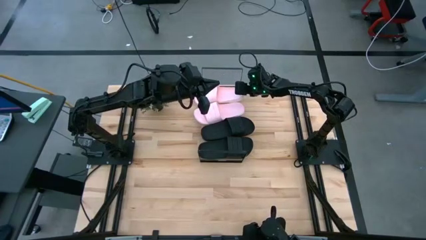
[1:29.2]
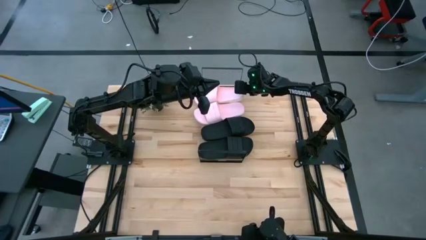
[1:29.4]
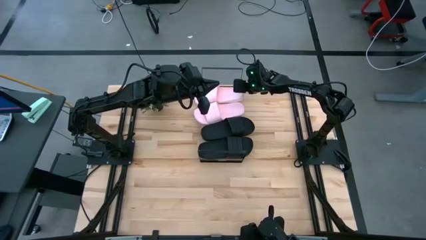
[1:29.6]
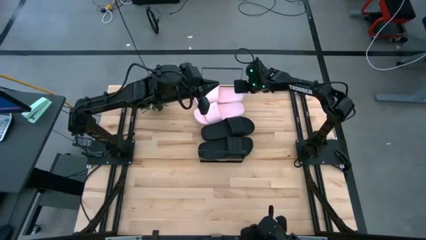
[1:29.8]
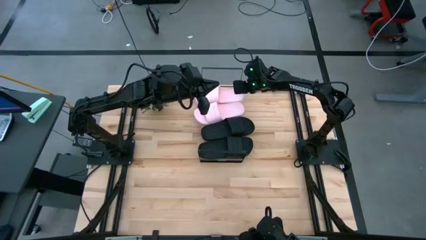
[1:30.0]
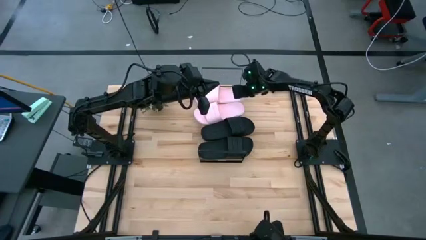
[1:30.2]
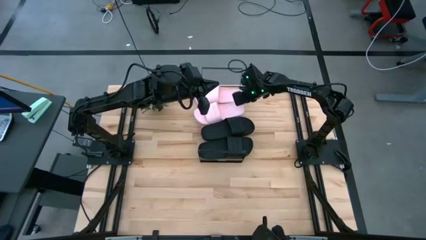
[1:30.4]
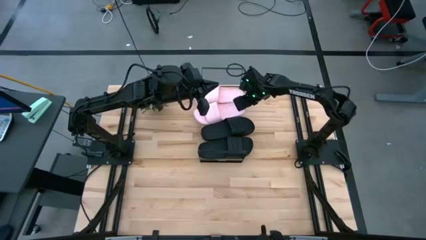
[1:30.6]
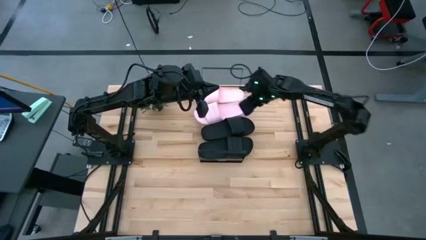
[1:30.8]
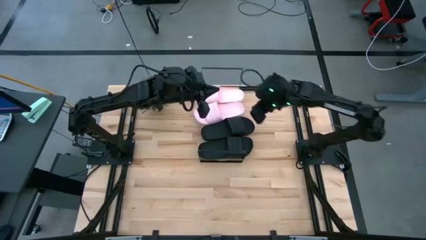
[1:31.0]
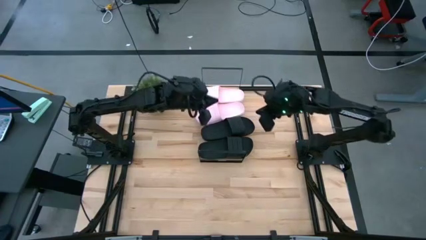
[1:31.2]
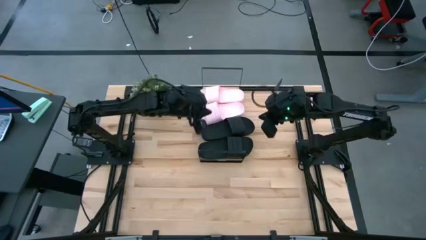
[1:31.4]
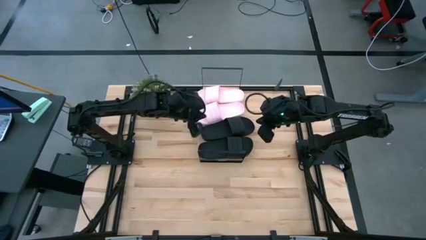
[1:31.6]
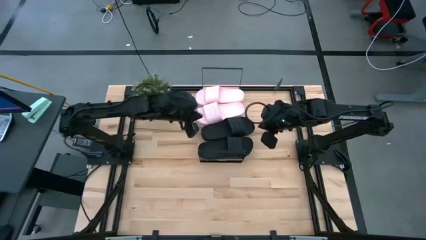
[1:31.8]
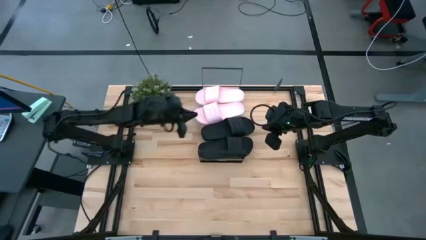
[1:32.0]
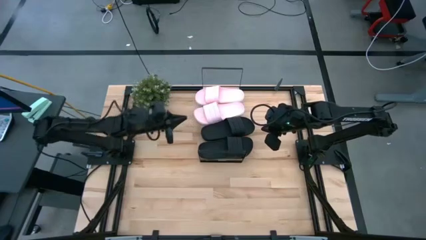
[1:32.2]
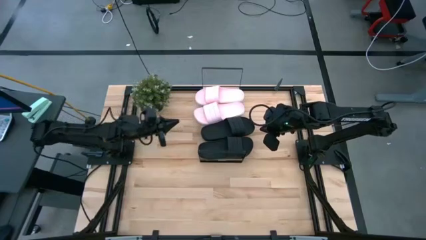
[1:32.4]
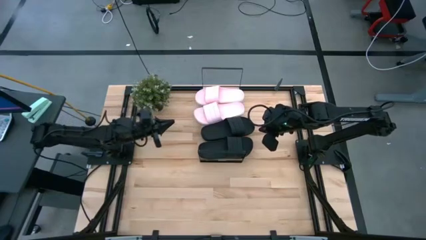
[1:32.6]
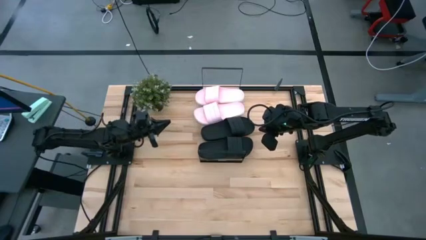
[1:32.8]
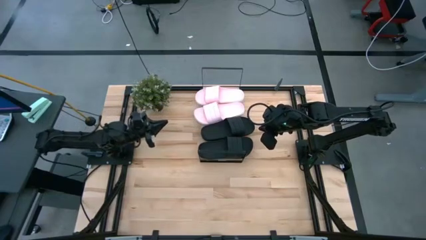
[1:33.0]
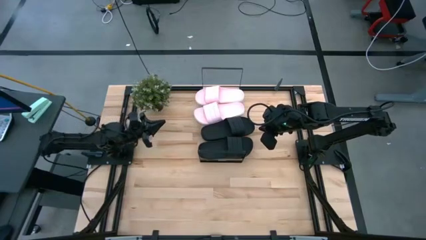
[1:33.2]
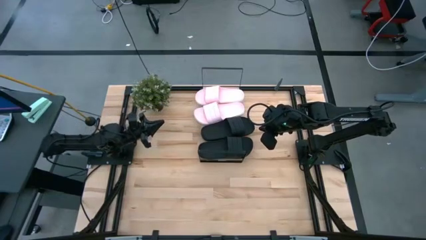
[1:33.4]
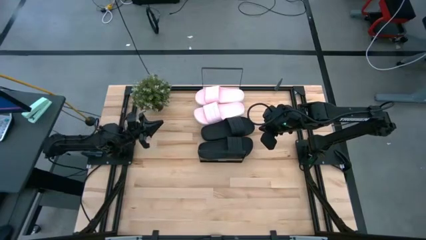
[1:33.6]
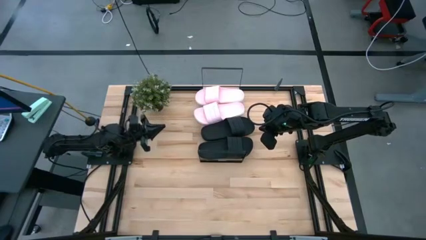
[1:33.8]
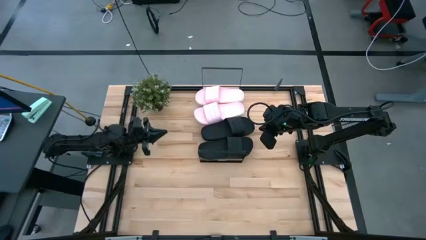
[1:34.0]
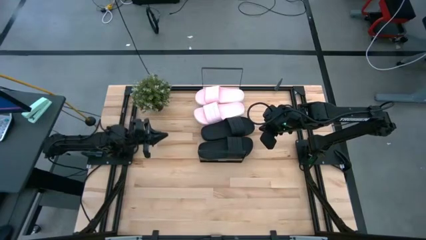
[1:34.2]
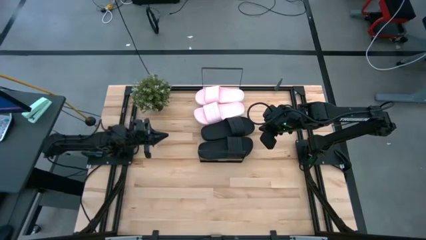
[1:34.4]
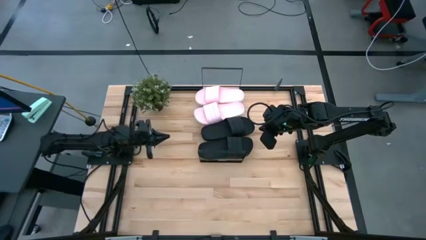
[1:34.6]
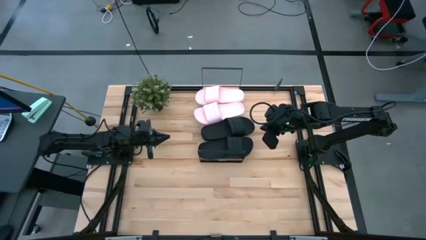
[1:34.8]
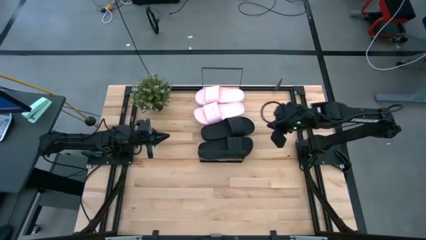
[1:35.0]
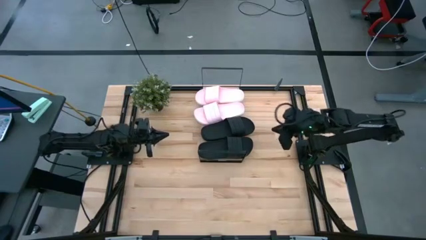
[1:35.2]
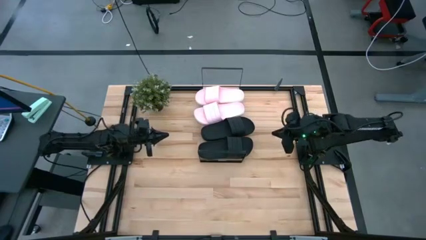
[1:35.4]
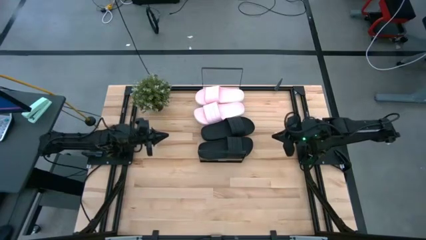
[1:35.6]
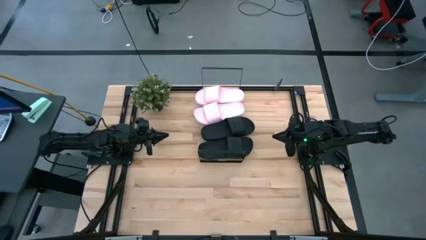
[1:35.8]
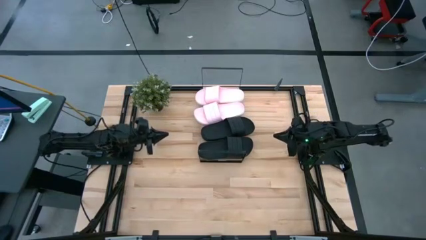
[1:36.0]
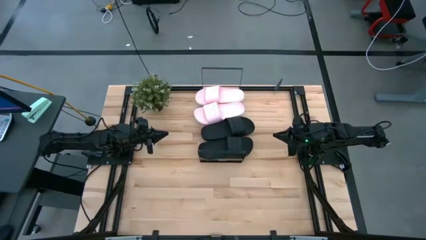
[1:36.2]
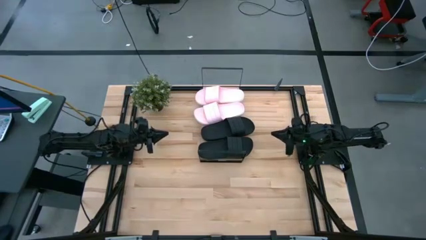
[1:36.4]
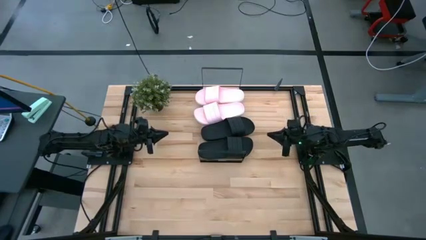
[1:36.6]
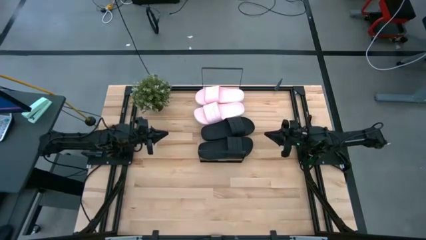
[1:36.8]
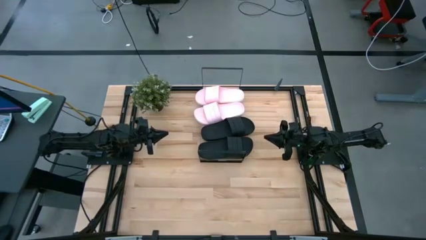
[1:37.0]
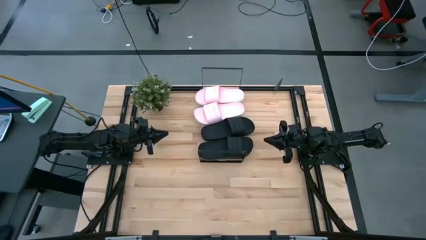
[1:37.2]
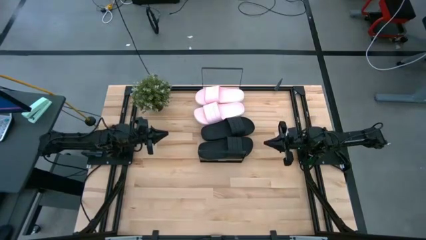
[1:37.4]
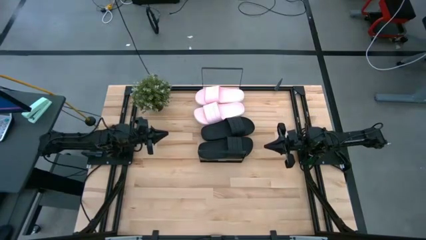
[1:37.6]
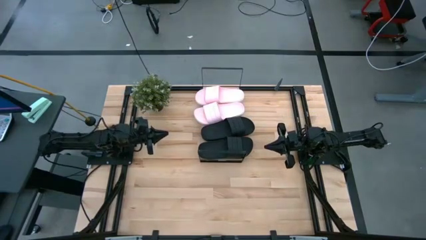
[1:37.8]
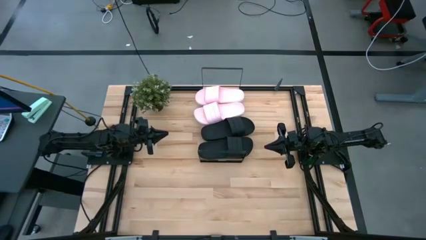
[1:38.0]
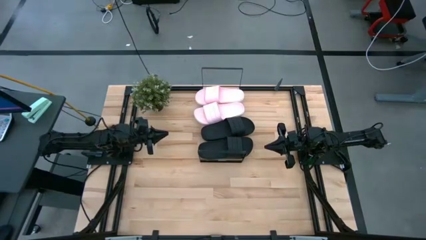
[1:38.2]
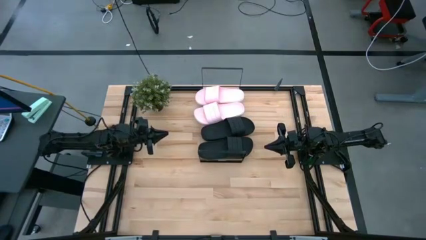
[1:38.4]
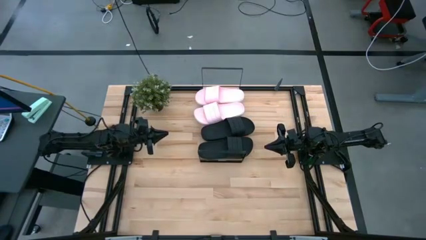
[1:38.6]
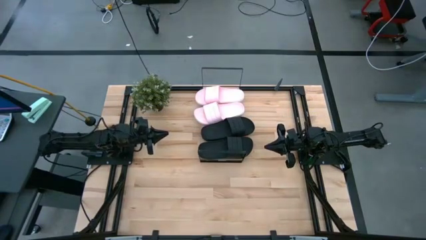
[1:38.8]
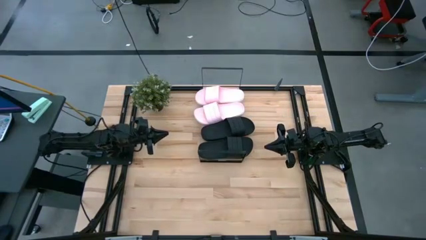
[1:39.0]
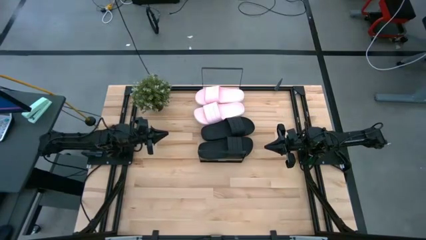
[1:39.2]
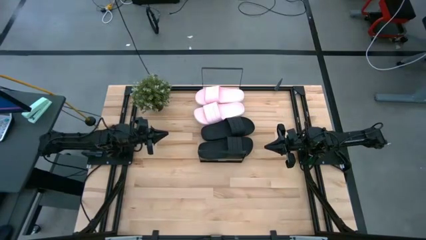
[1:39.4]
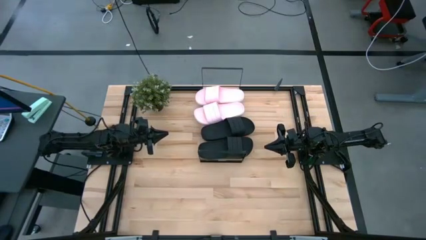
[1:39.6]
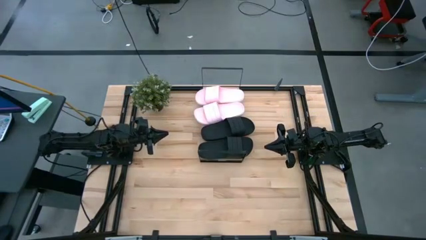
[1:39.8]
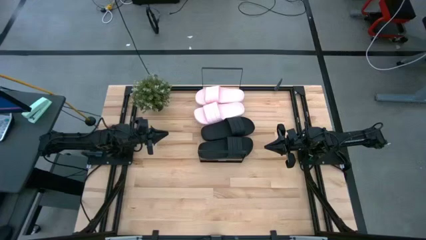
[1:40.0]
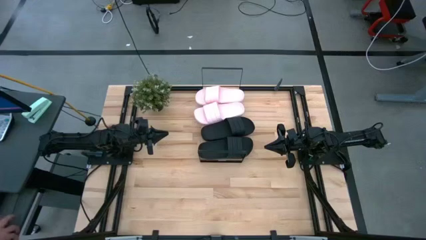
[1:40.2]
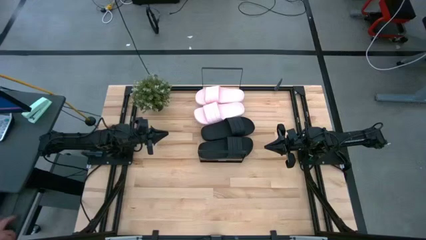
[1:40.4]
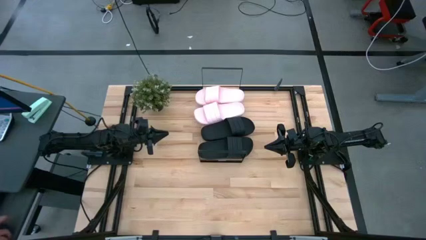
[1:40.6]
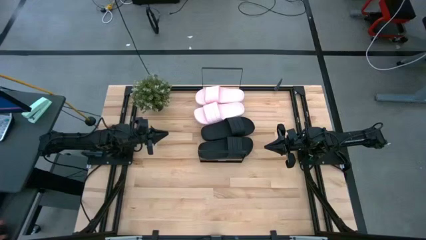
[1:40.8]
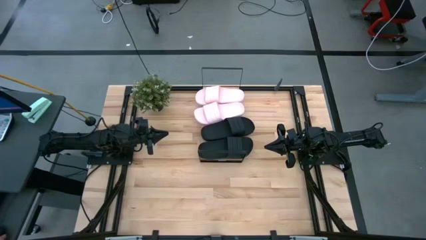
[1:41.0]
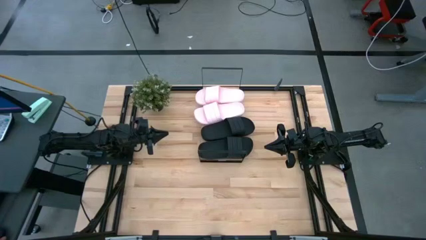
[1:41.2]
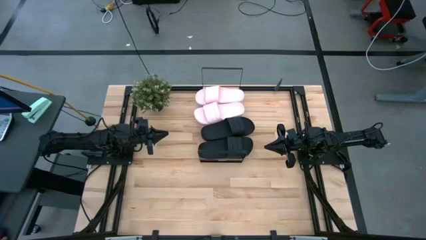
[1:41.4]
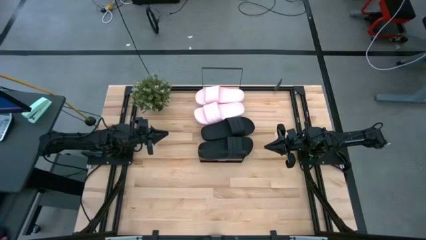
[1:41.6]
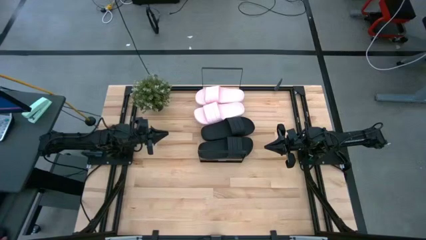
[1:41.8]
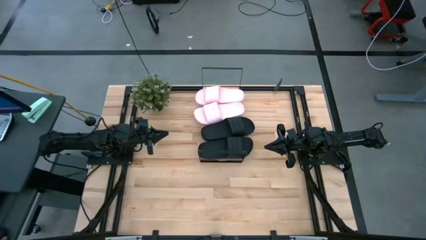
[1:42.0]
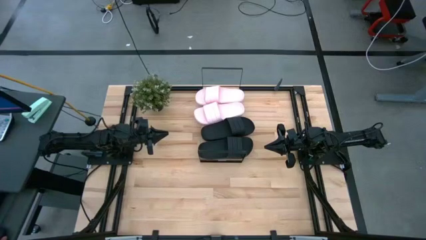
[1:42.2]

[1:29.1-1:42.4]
Task: Pick and place slides into the shelf
Return to Home Position

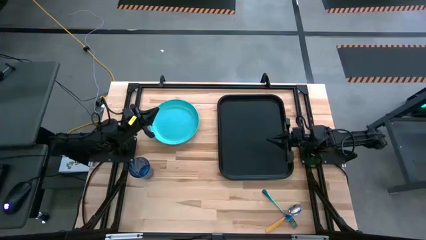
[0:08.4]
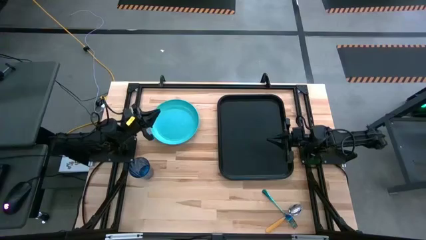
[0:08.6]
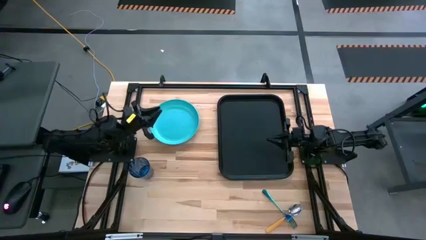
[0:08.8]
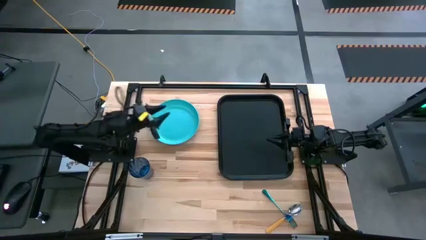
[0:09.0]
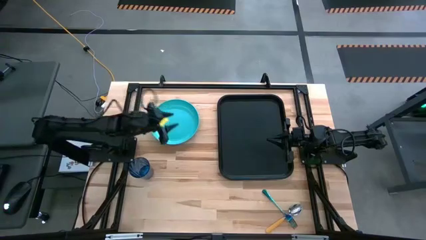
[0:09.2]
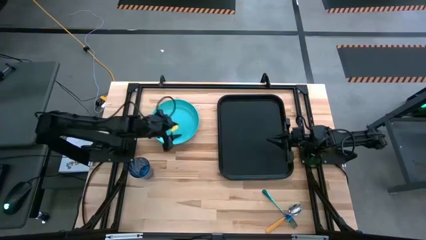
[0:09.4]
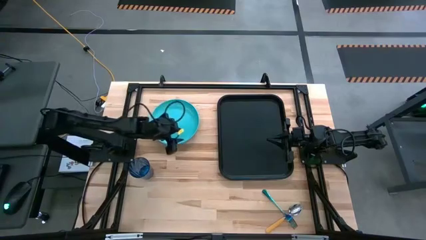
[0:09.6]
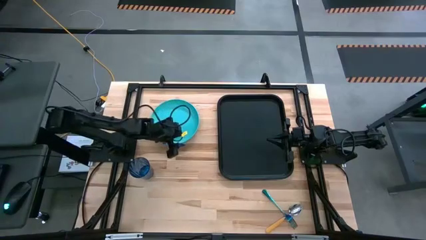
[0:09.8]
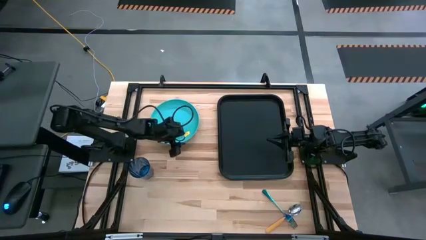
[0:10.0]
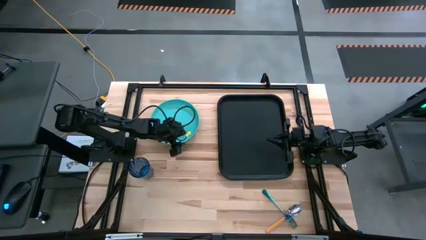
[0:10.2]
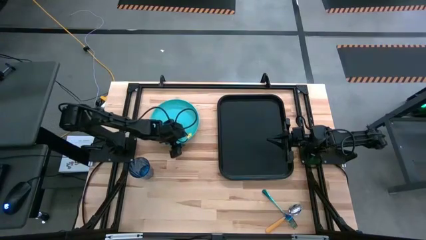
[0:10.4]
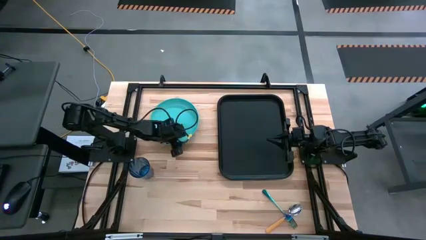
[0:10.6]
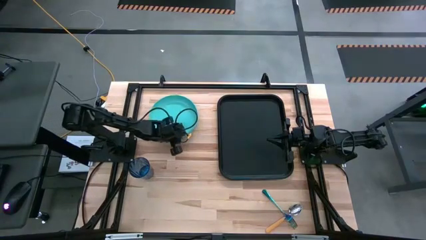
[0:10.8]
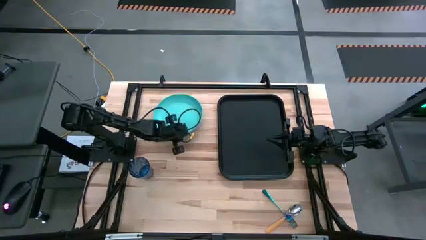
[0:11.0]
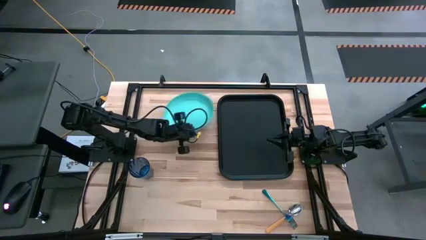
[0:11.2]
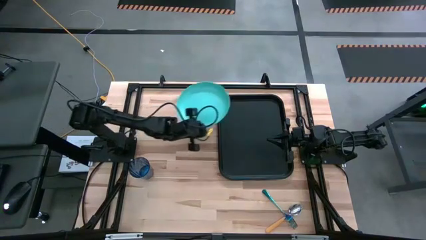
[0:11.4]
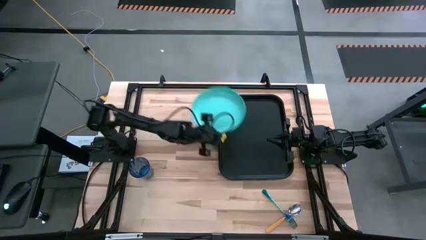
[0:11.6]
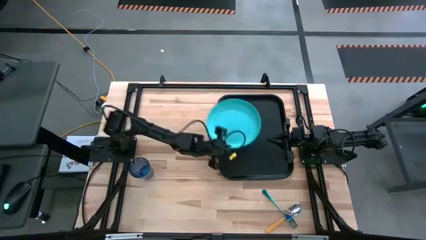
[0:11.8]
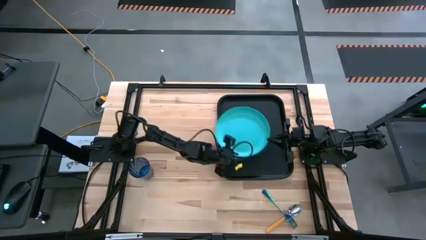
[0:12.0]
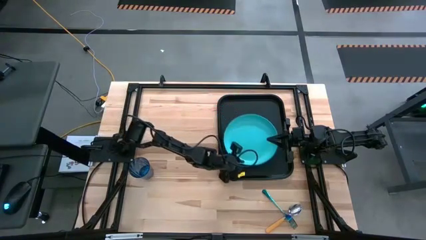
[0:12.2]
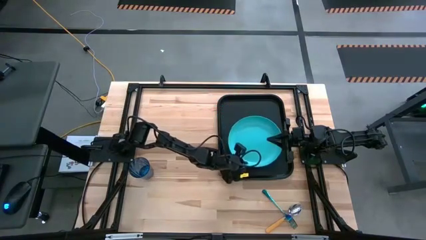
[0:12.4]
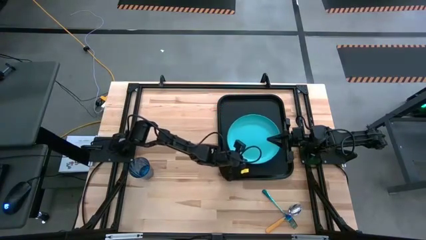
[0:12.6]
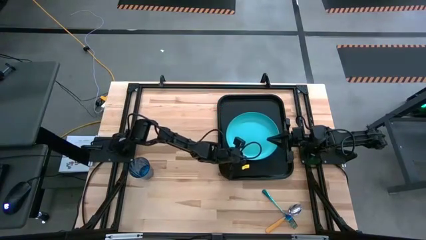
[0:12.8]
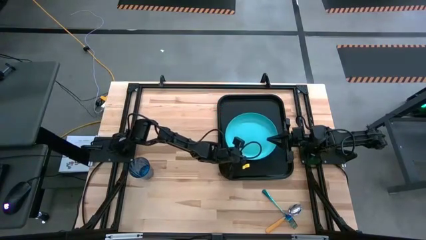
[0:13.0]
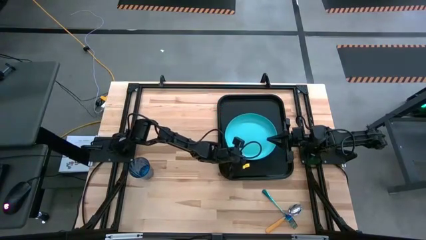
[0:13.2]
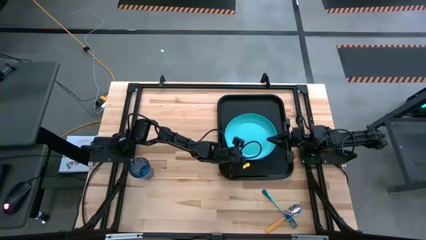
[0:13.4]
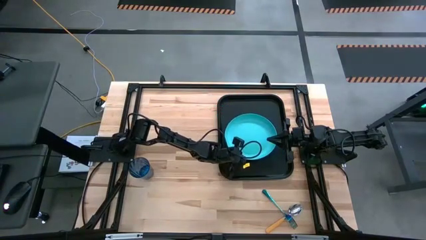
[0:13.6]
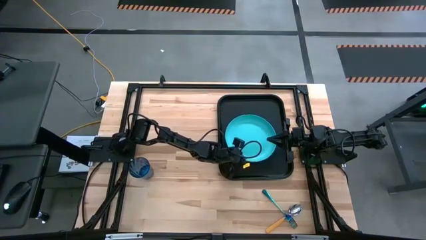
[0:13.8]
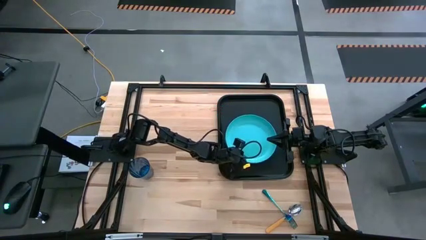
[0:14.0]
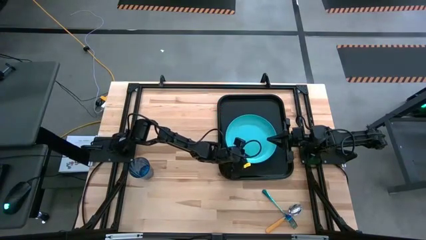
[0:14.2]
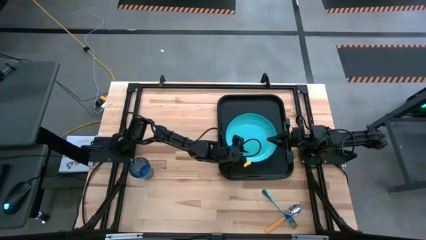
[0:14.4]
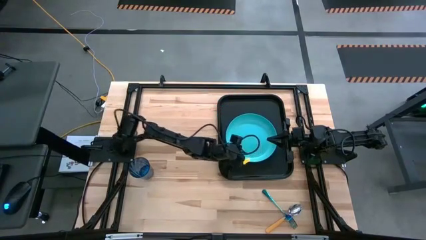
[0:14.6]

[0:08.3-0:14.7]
Task: Pick and place plate/cup/fork/spoon on tray
Put the blue plate on the black serving tray
